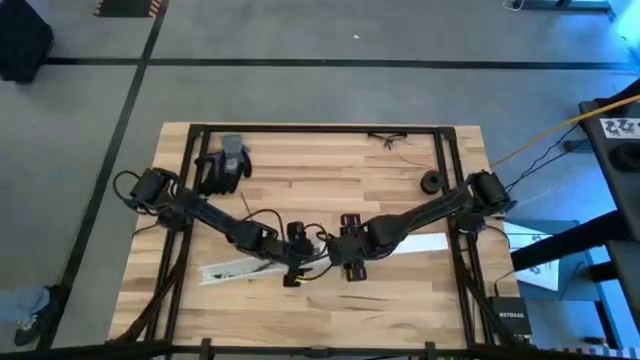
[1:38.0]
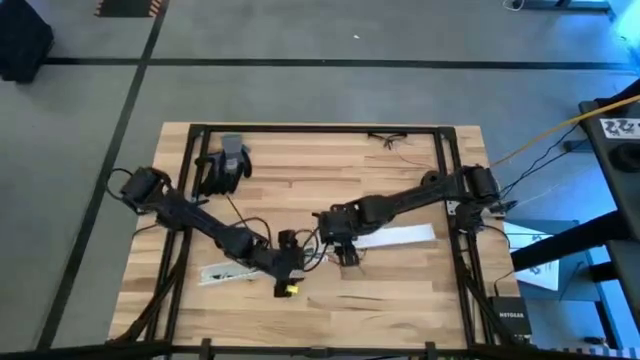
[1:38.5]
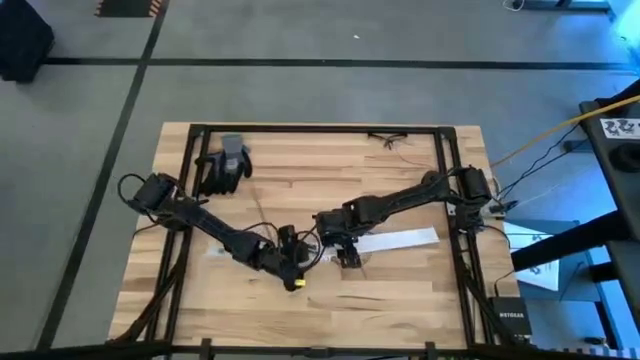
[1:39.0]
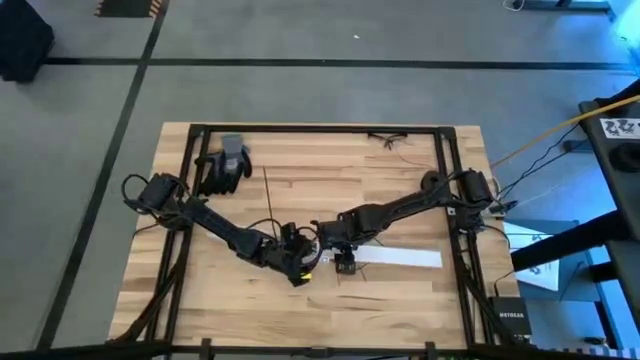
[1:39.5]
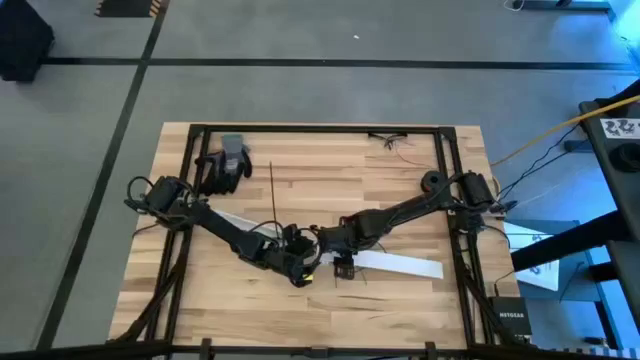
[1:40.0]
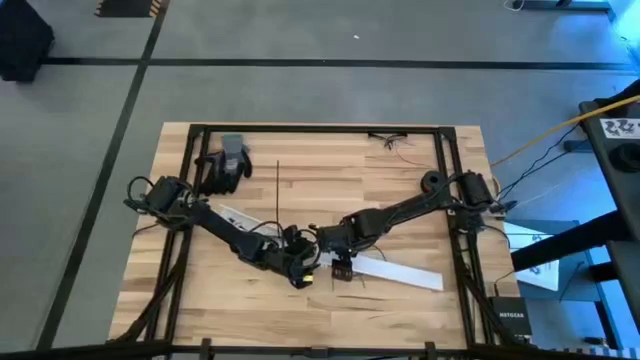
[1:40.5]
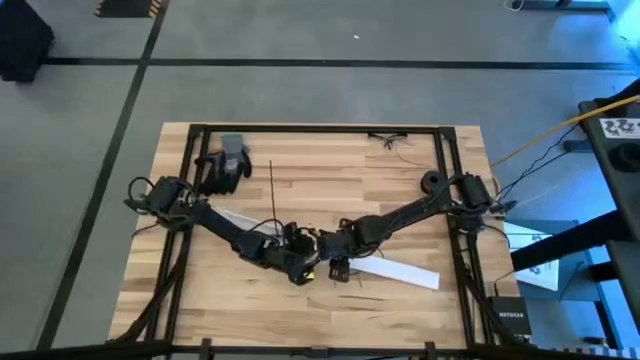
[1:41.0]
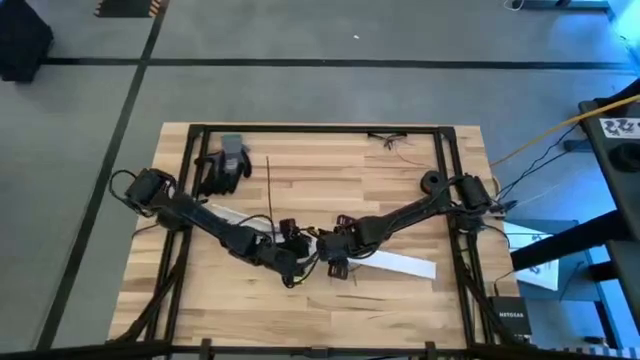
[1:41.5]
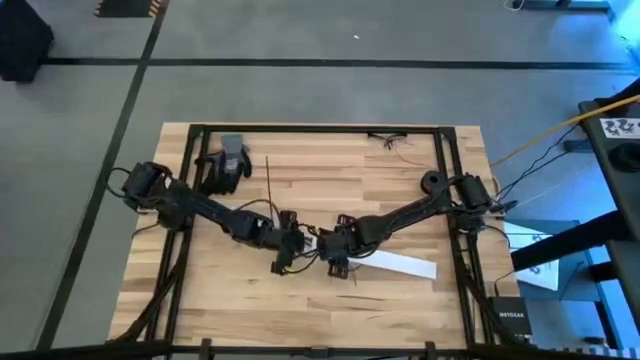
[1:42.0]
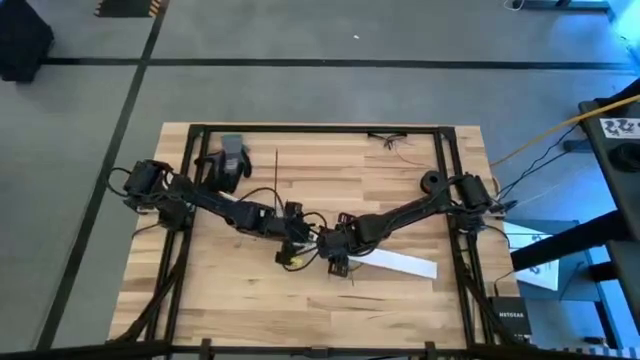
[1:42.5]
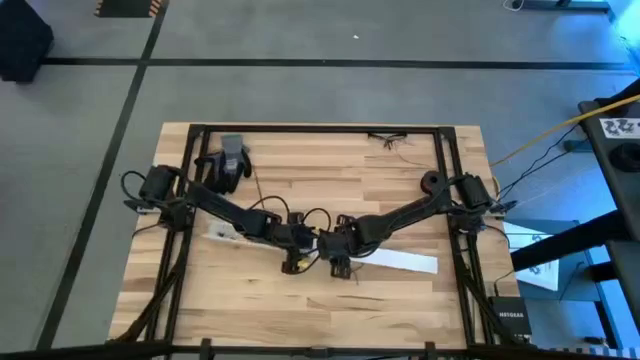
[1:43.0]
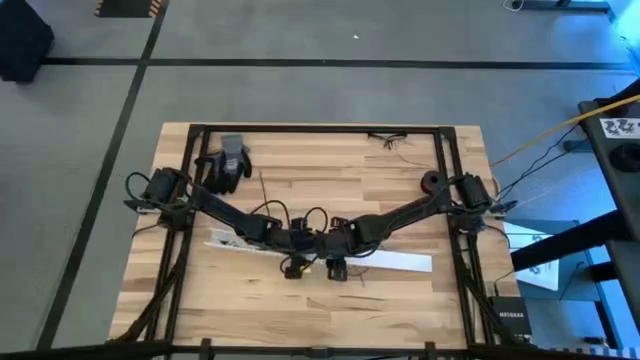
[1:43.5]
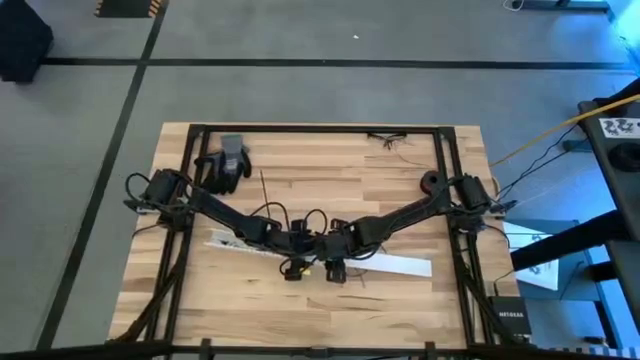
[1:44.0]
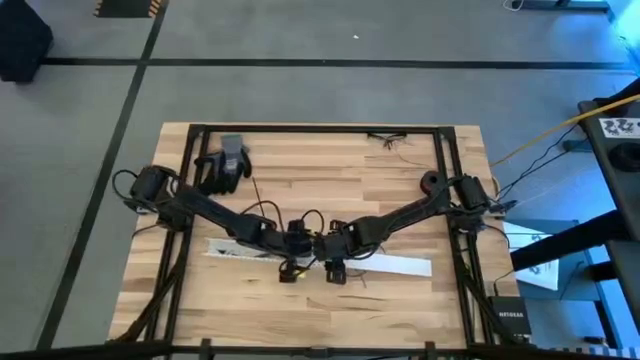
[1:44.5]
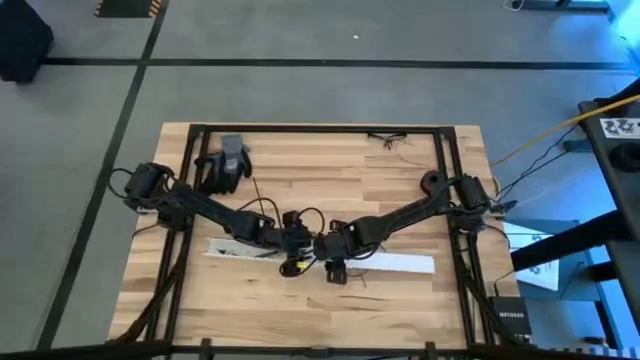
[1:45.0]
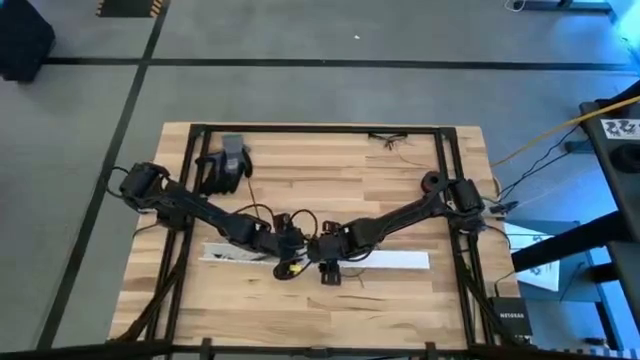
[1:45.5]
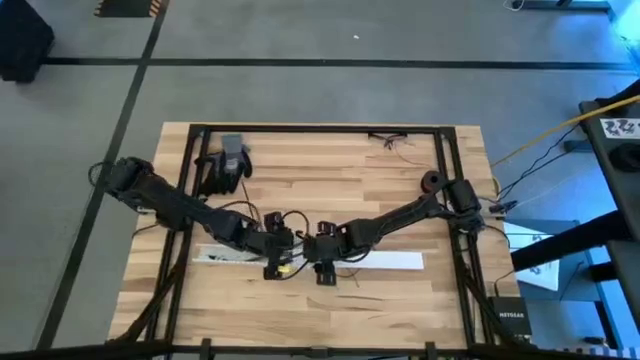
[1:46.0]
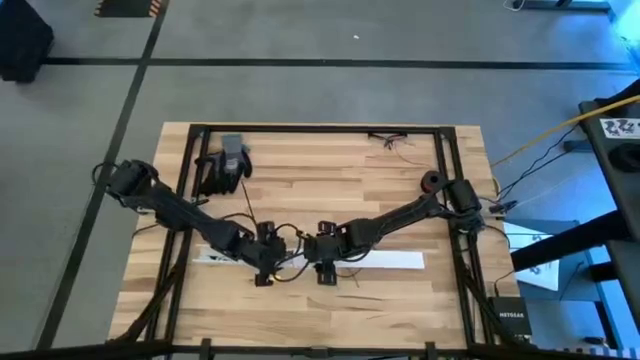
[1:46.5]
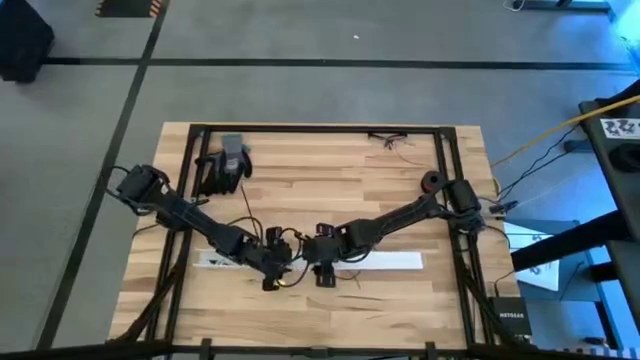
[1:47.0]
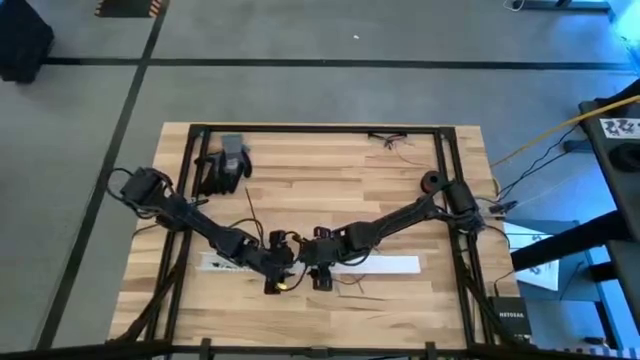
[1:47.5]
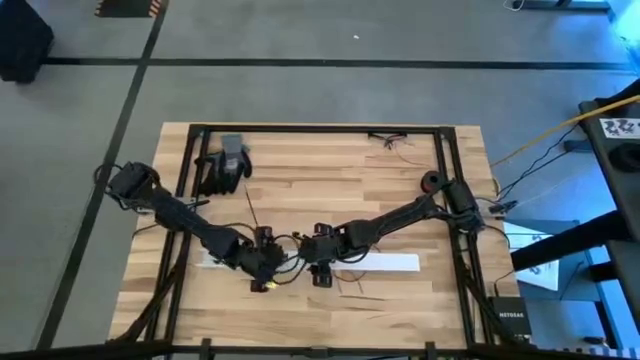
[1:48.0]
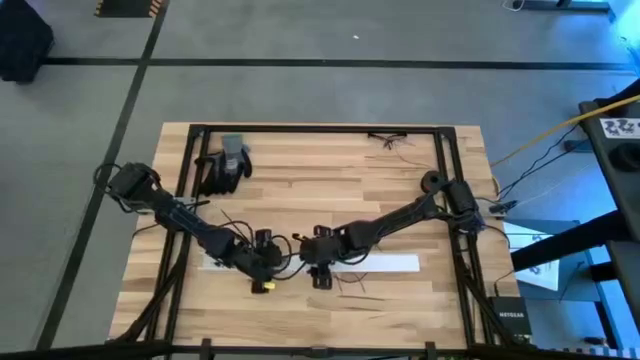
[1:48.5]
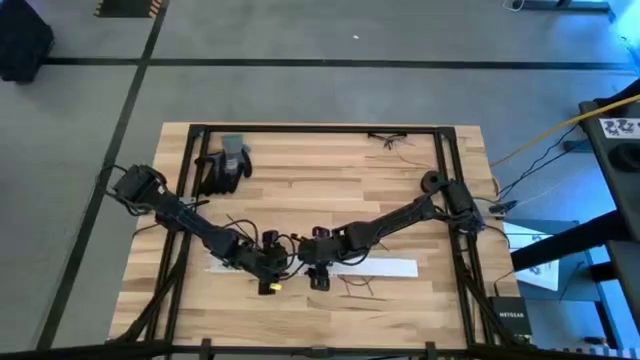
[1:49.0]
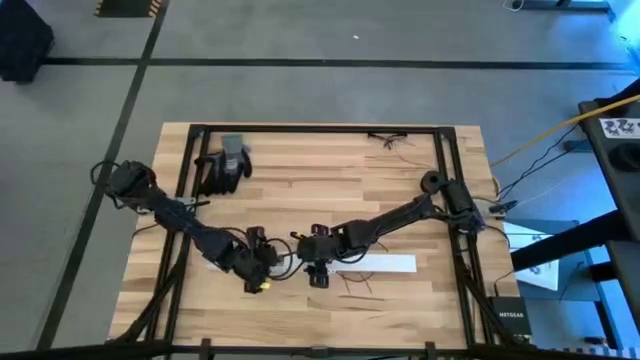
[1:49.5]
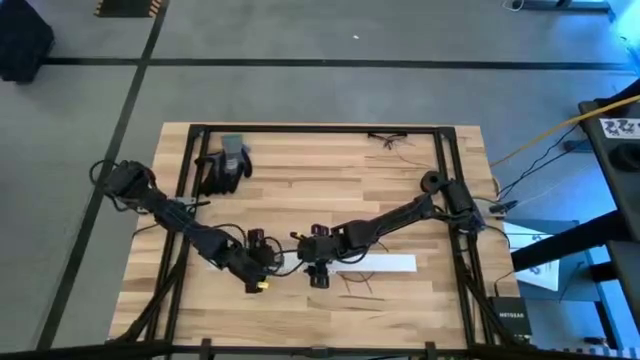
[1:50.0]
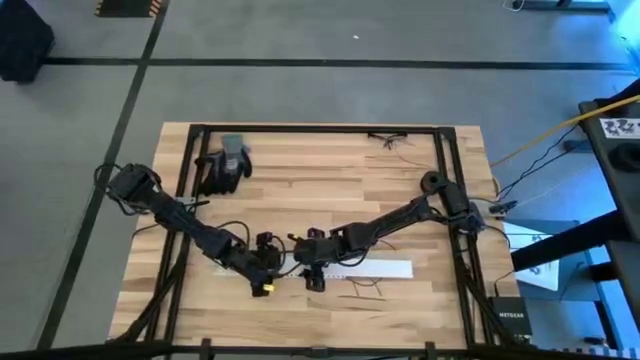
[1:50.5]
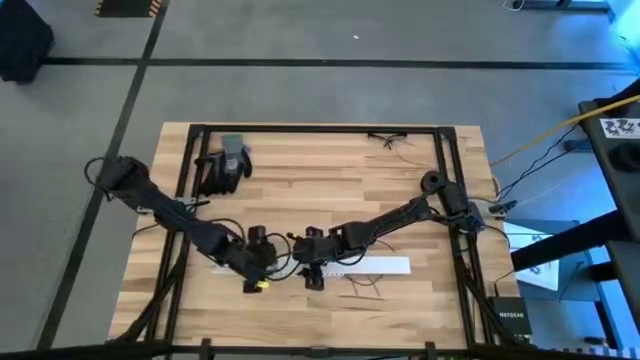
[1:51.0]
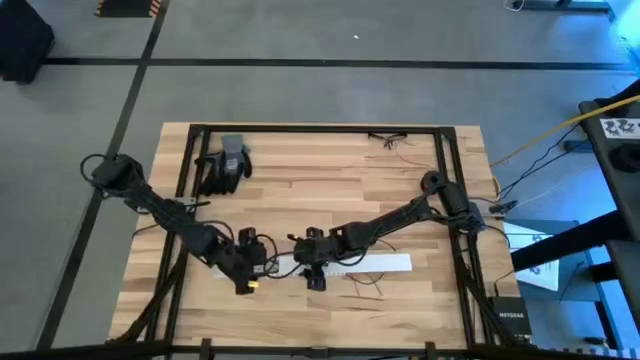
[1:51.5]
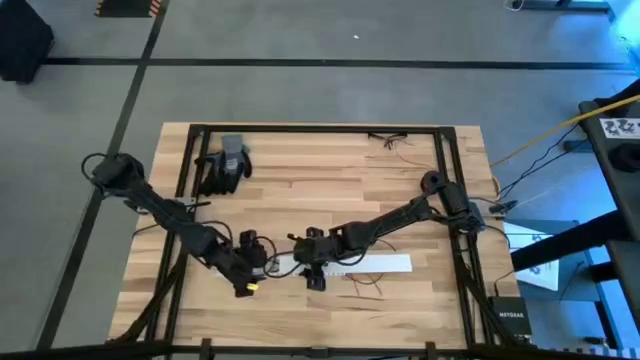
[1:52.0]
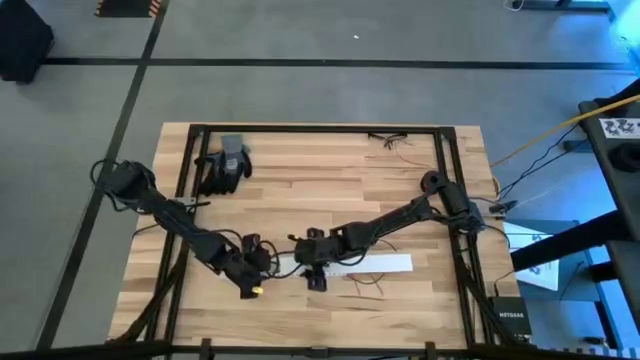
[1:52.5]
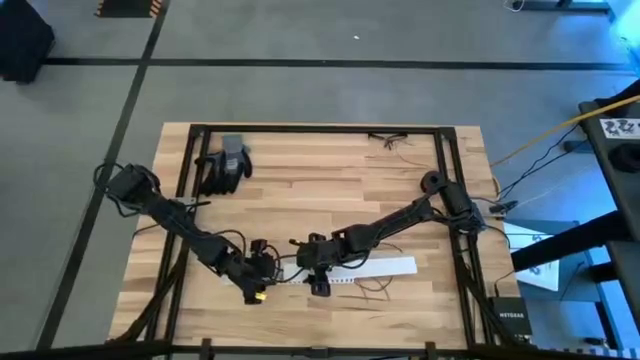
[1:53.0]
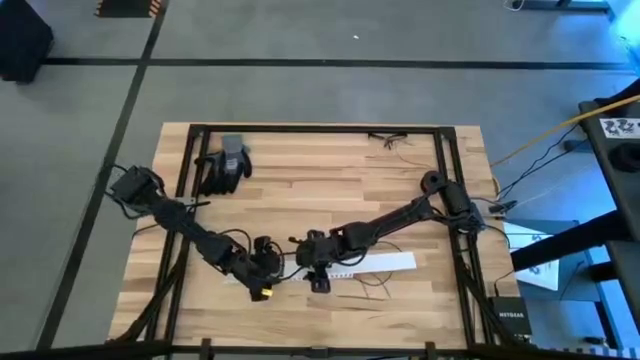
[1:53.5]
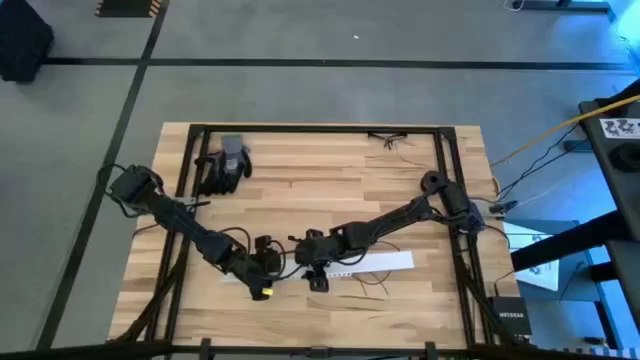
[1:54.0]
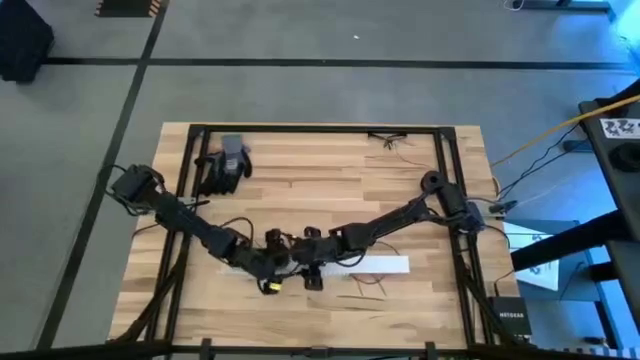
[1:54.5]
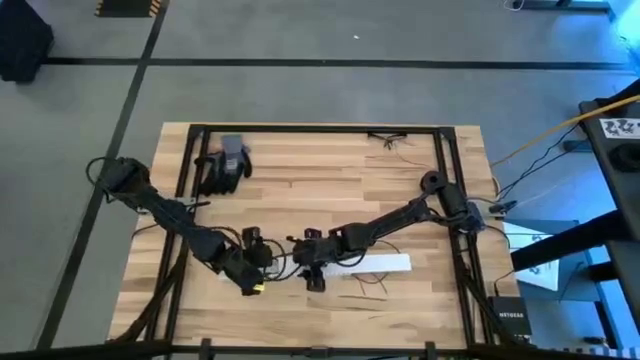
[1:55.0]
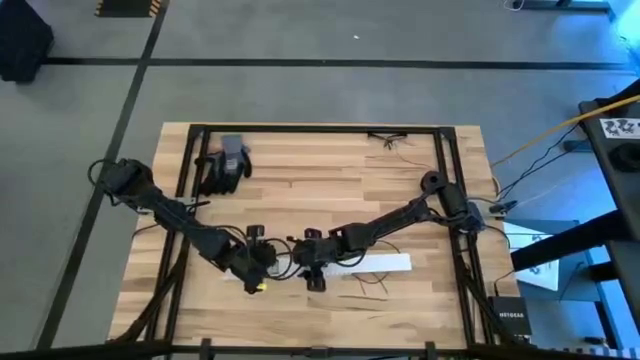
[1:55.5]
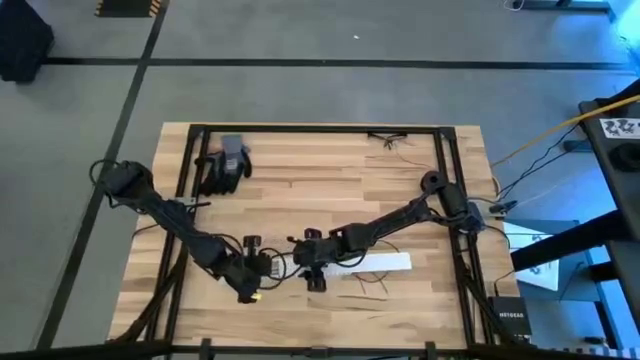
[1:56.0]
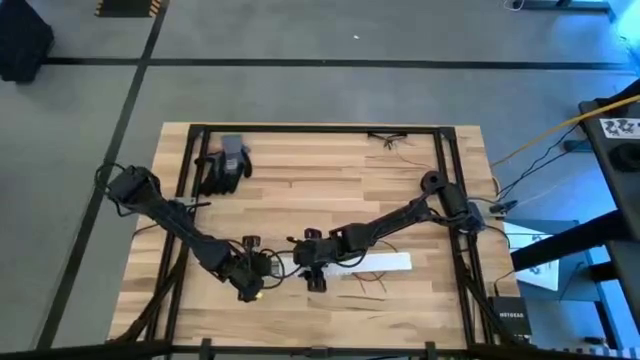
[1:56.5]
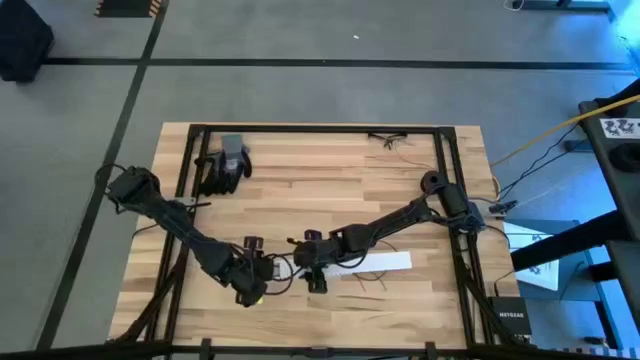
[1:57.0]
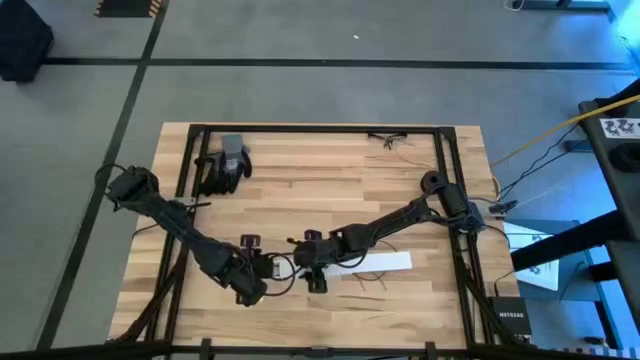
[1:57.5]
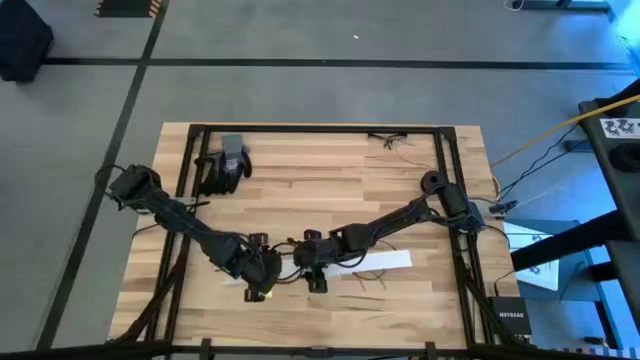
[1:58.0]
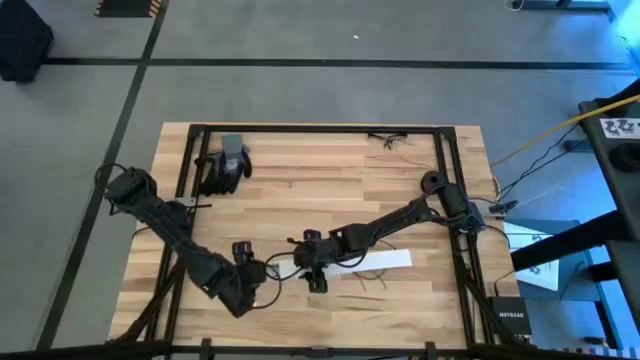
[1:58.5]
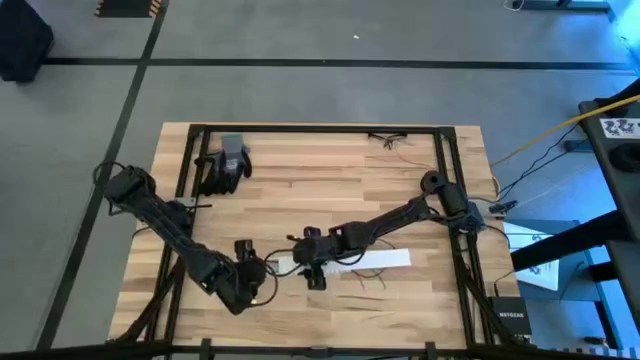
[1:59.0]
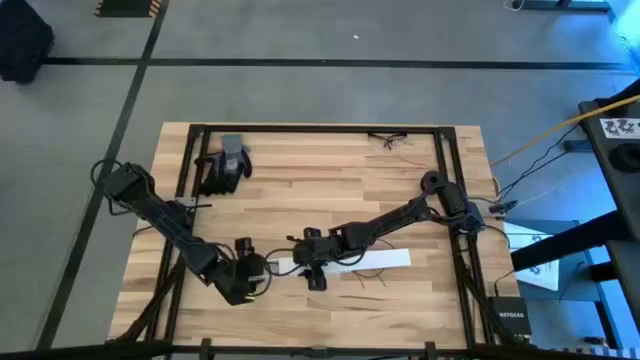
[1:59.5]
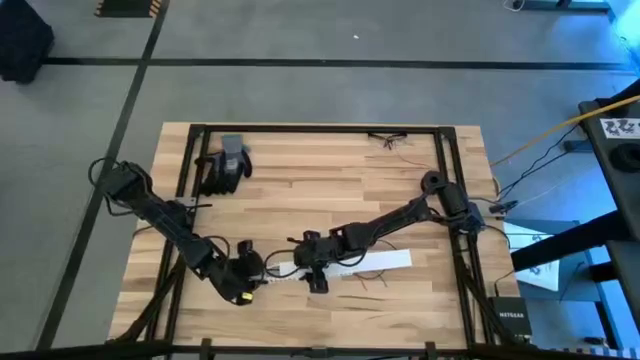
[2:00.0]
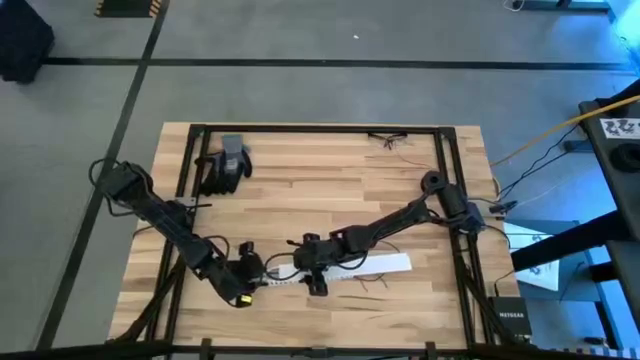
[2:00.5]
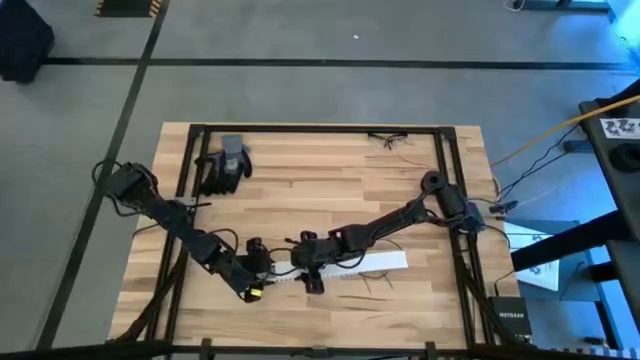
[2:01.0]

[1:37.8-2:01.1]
Task: Ziptie cables
Close the white cable duct
